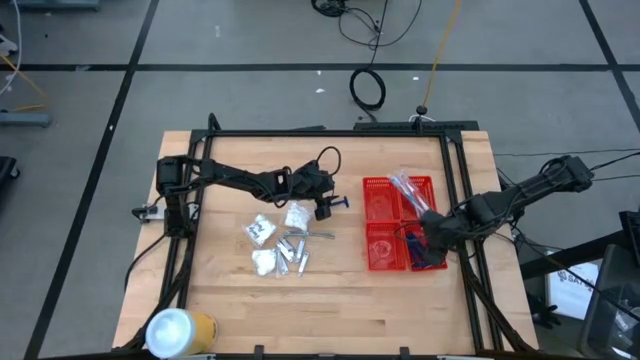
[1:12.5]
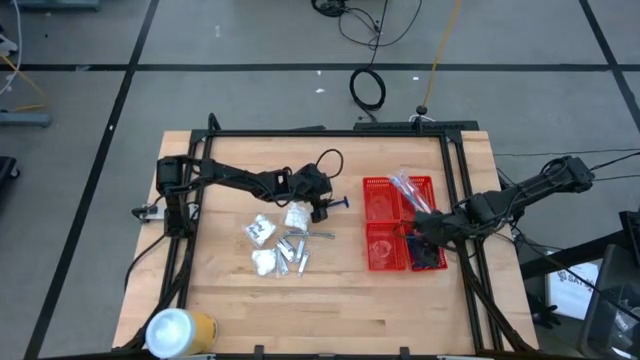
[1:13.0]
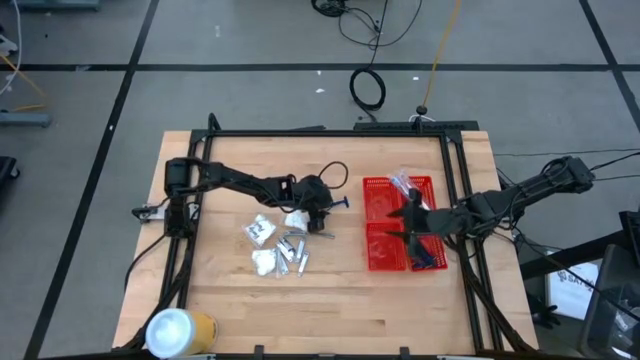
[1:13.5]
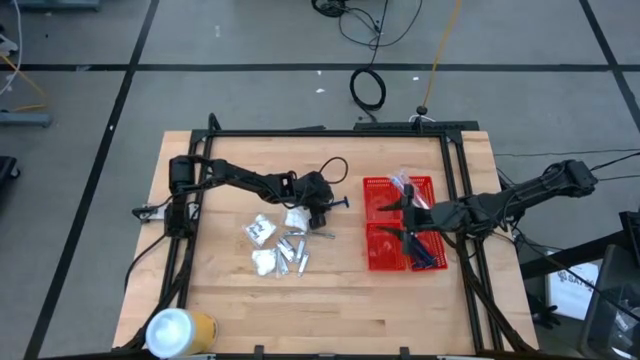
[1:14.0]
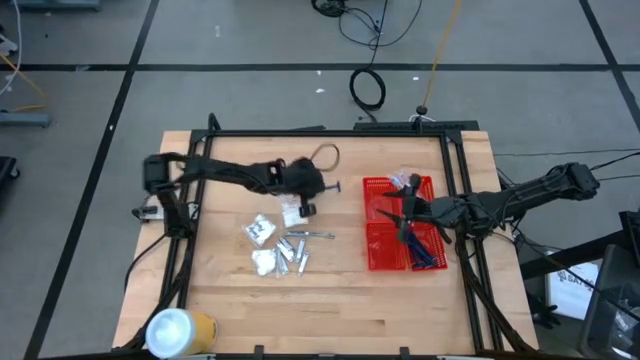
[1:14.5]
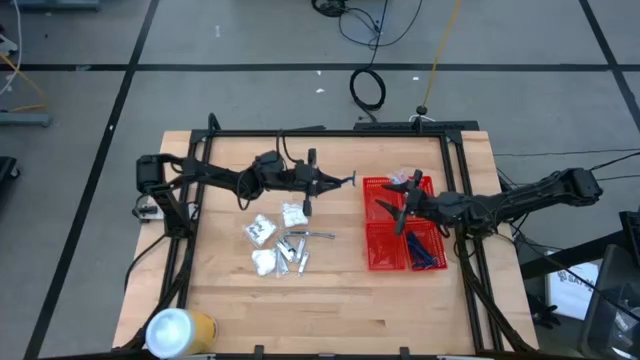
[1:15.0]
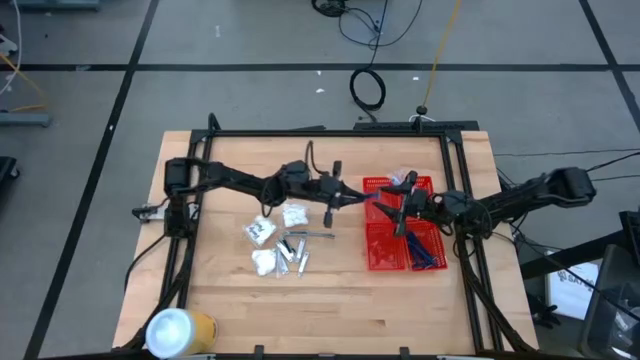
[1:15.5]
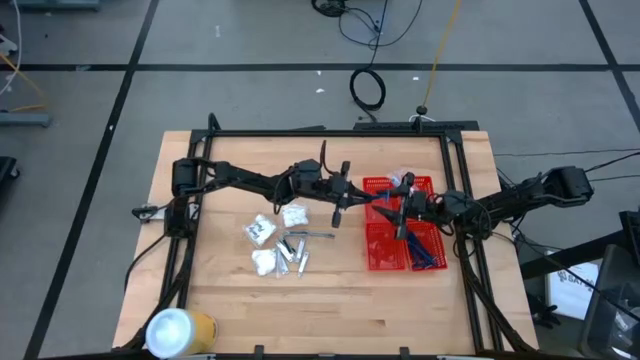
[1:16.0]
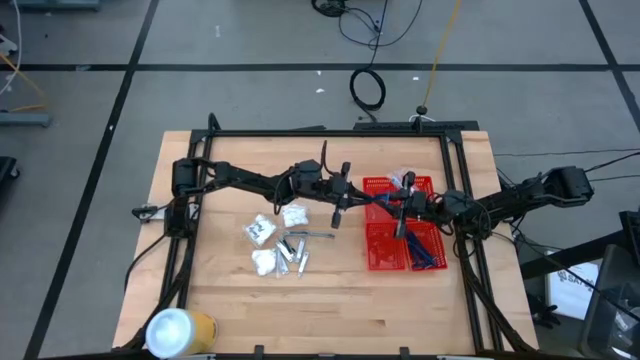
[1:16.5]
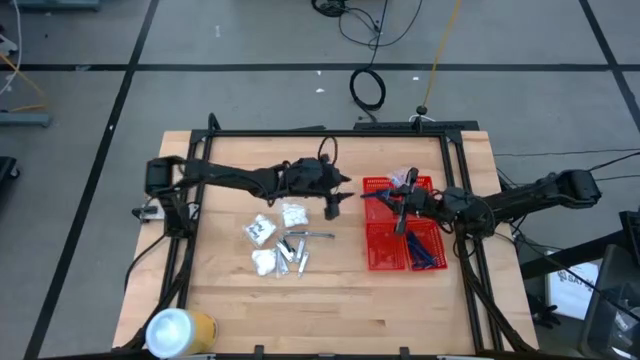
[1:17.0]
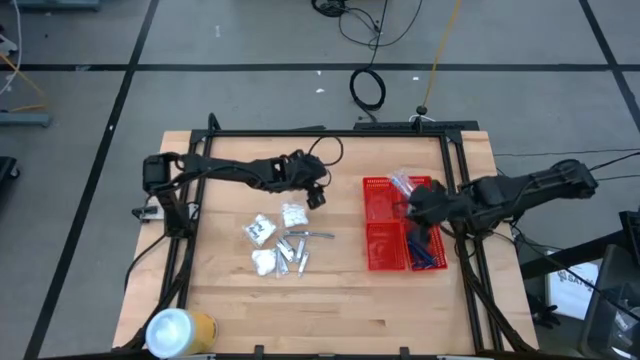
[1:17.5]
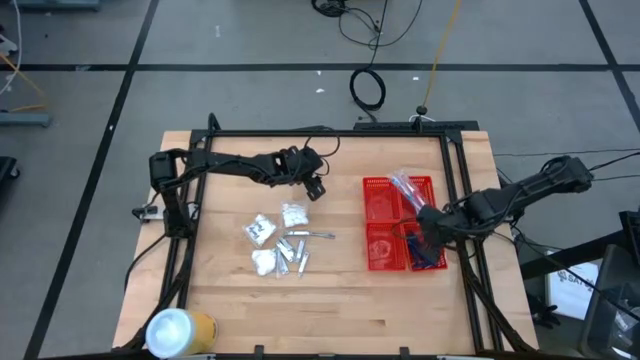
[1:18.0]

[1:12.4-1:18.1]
Task: Pick & Place Travel size toiletries
Put the razor into the bottom right red bin

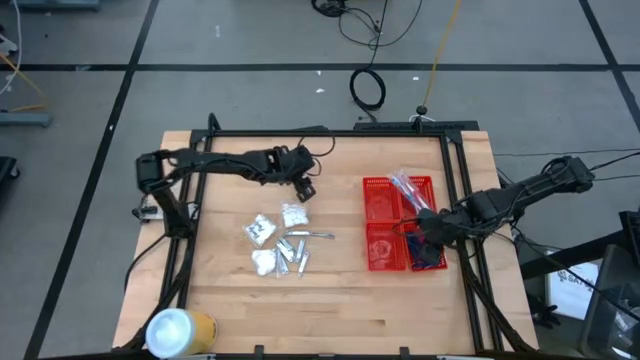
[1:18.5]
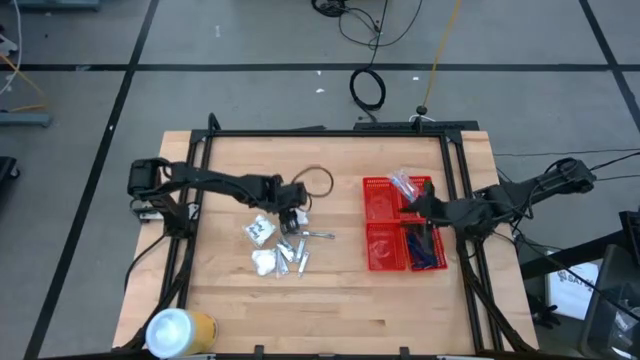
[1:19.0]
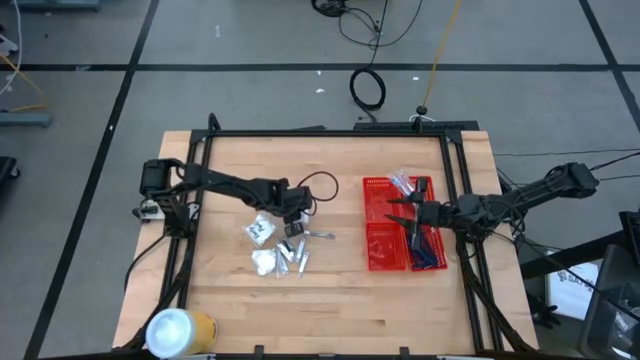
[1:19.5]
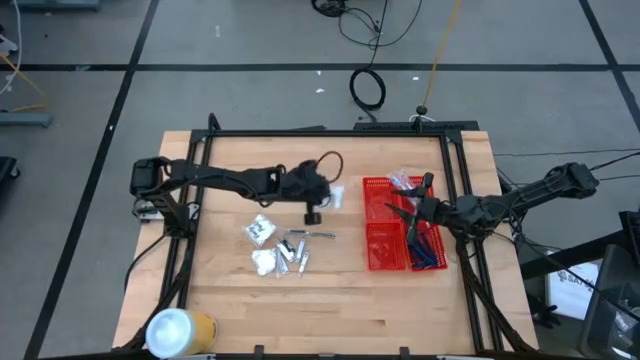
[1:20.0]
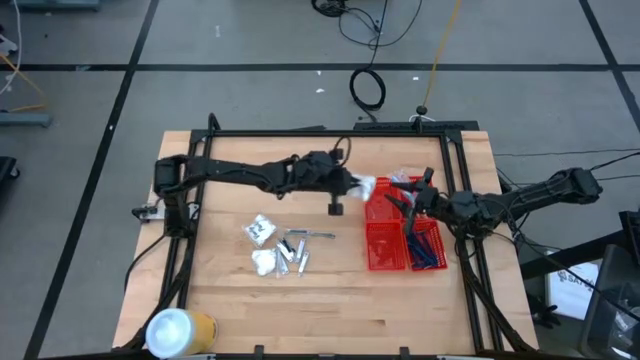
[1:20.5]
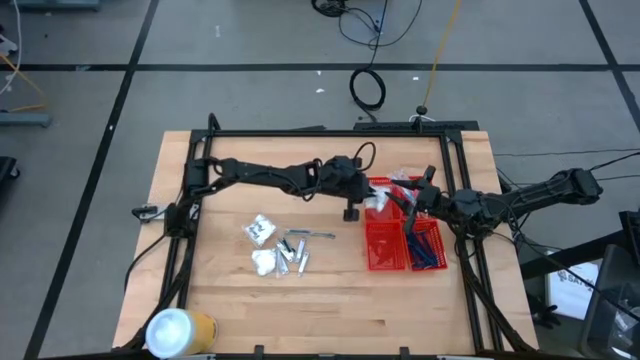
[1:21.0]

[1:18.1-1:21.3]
Put the cotton pack into the top left red bin

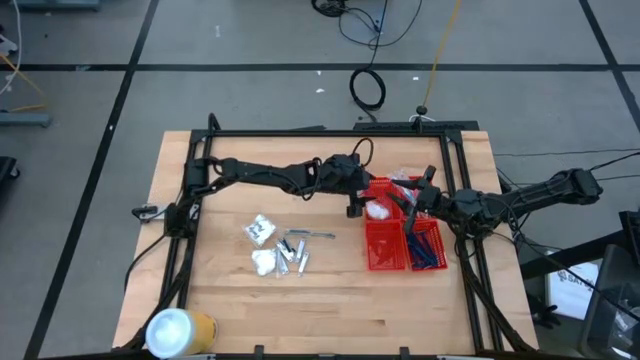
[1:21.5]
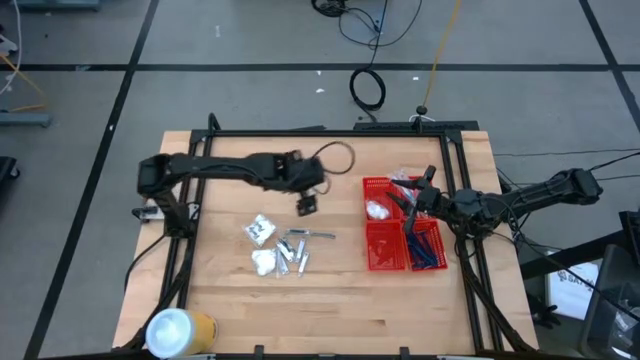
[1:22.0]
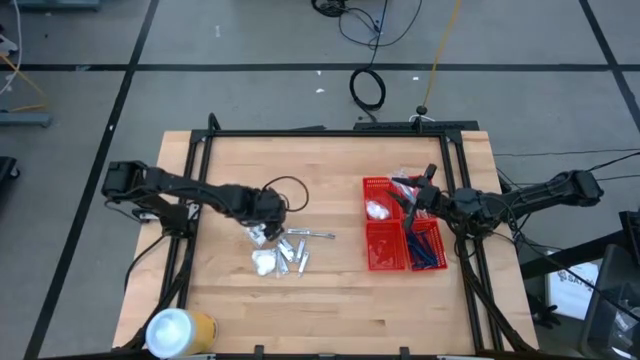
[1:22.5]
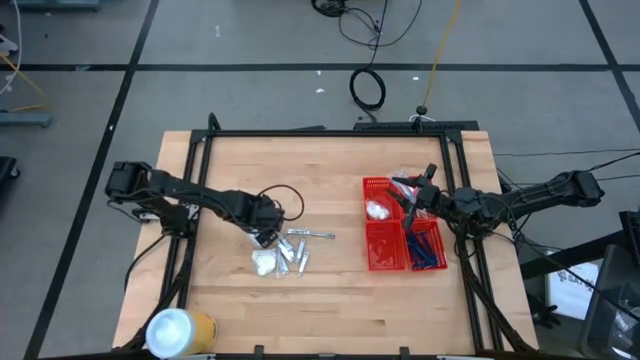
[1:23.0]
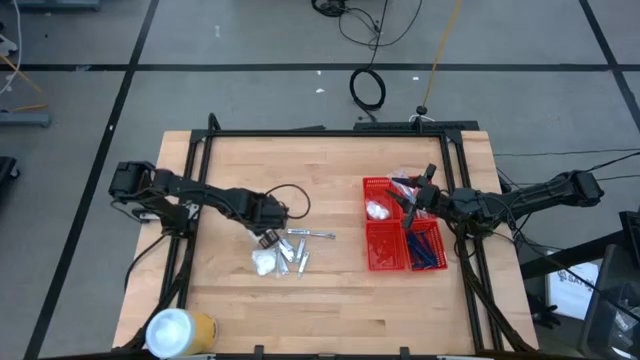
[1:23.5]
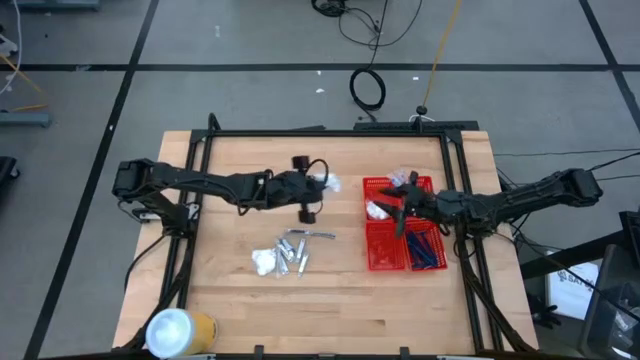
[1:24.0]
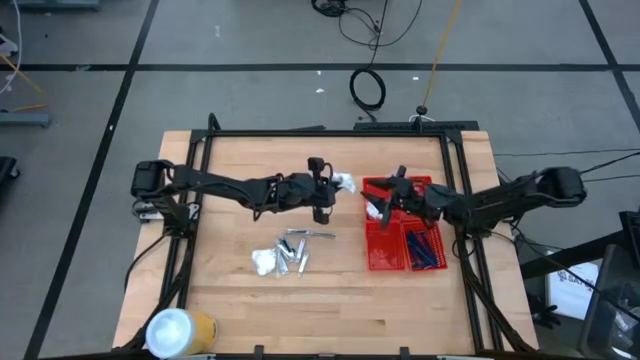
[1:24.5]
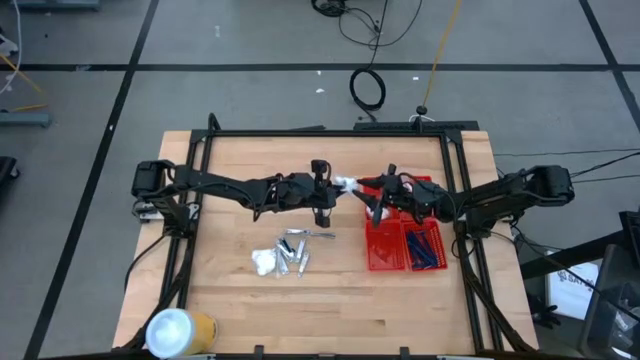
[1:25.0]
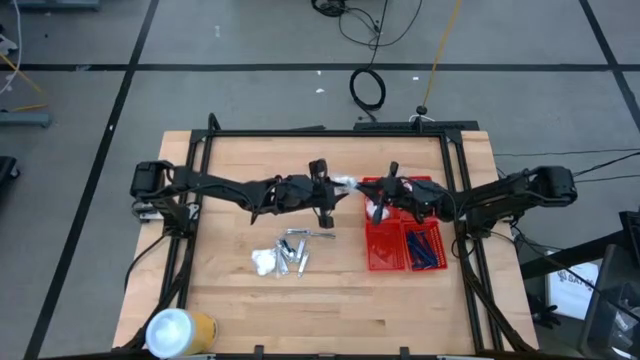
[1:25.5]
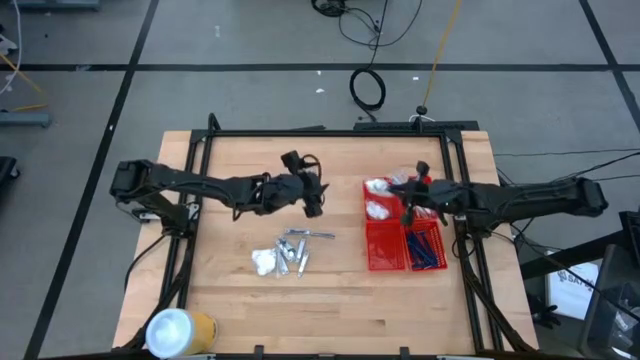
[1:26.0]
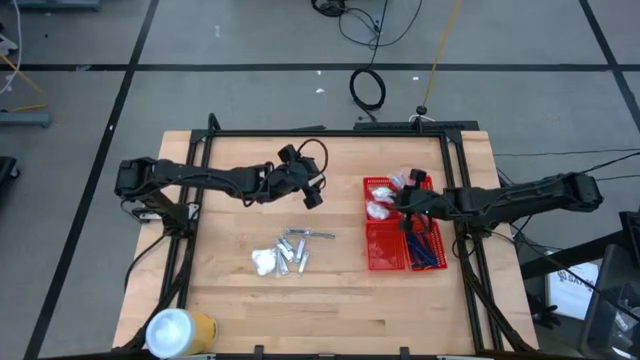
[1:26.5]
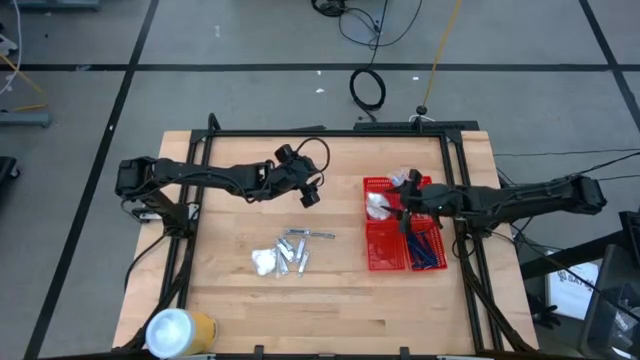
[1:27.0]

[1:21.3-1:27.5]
Put the cotton pack into the top left red bin

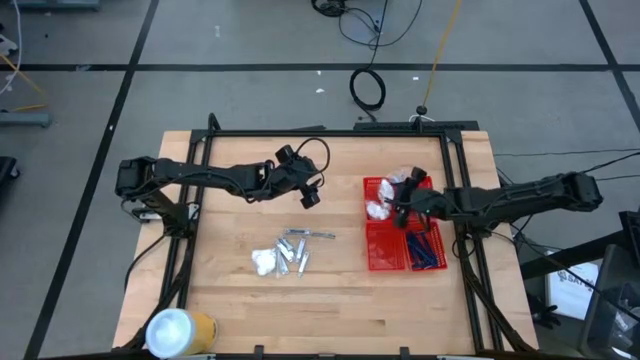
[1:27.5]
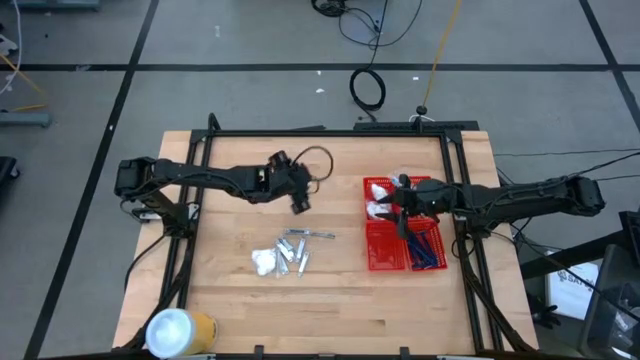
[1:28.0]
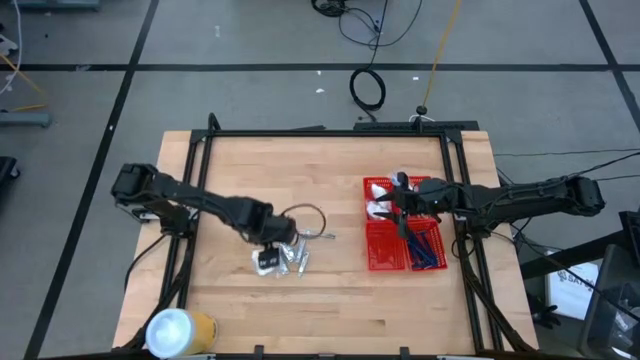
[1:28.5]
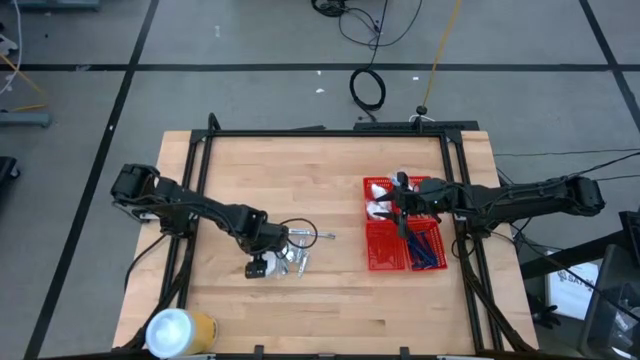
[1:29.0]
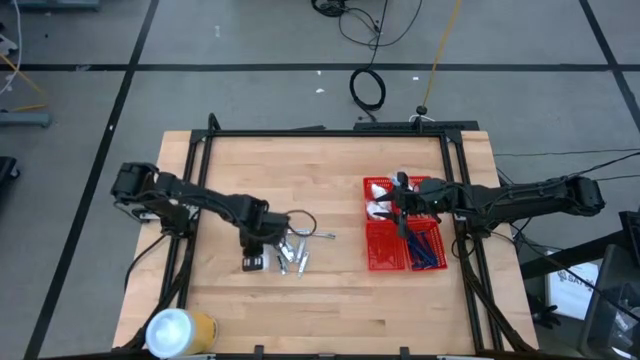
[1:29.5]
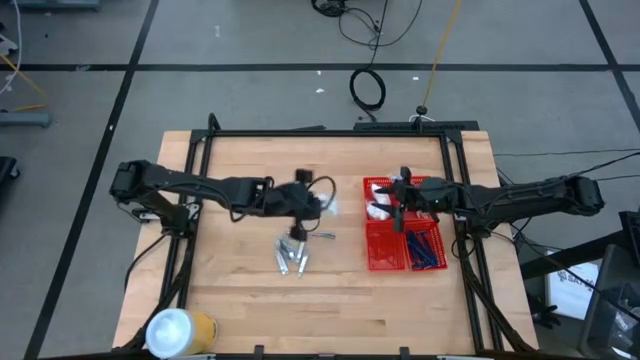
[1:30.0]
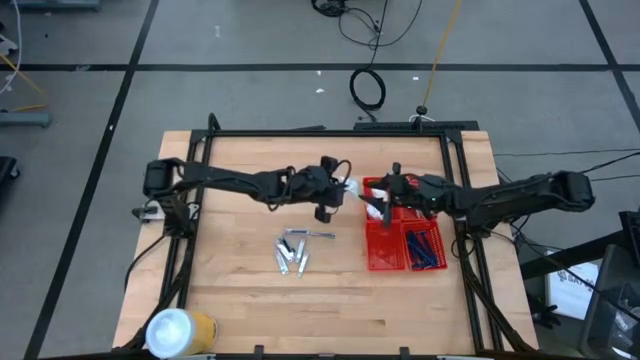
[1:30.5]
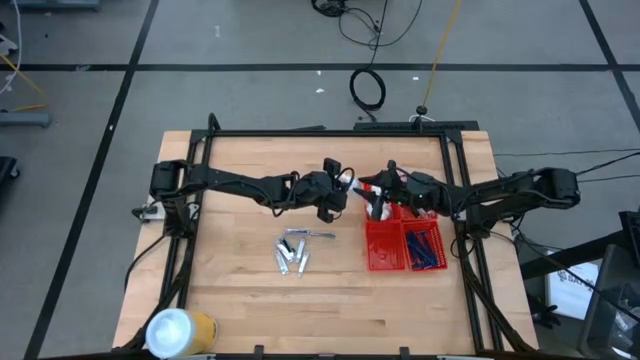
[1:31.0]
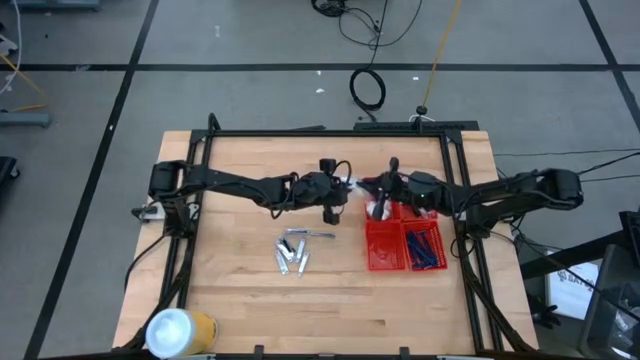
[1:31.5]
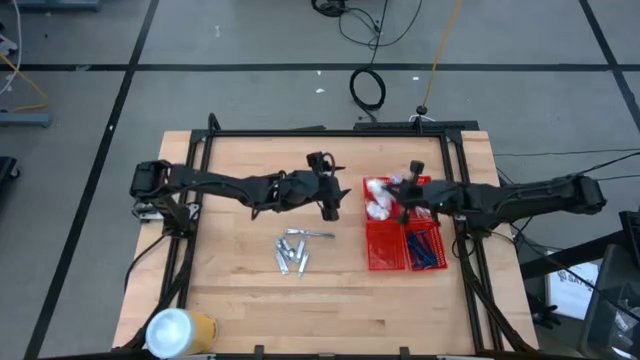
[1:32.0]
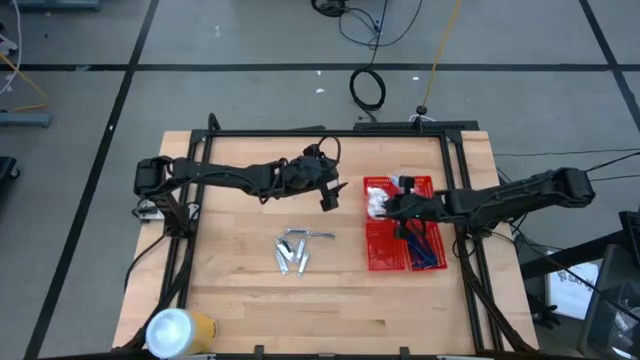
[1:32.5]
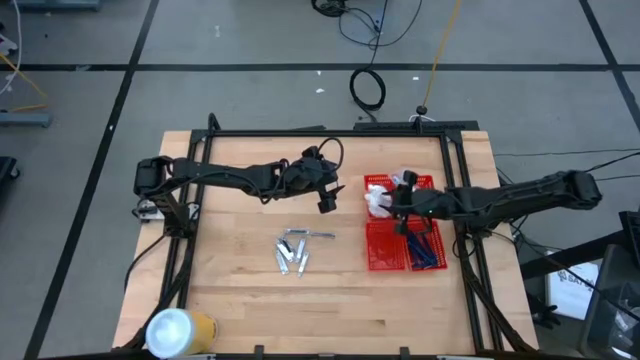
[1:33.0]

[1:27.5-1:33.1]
Put the cotton pack into the top left red bin
